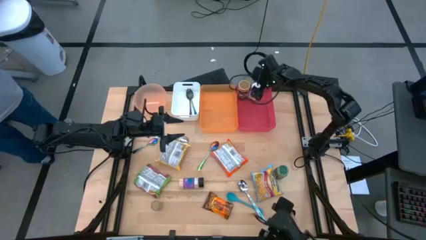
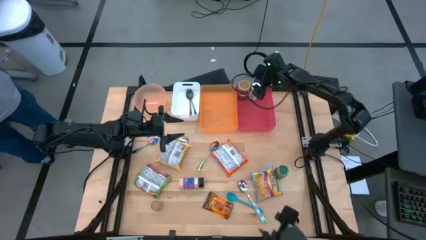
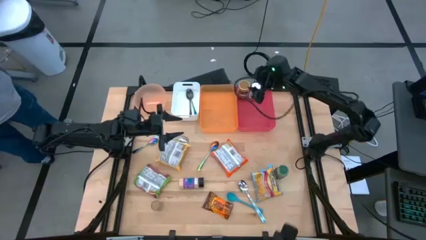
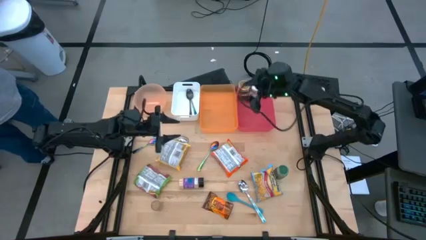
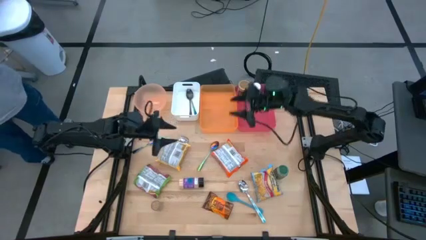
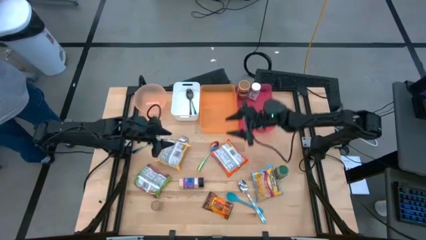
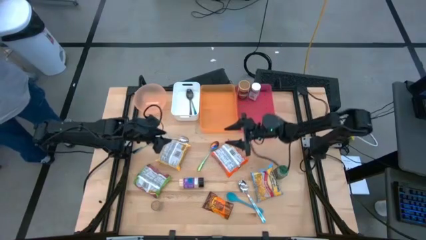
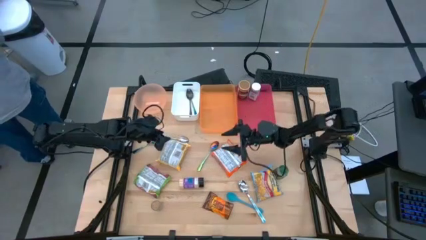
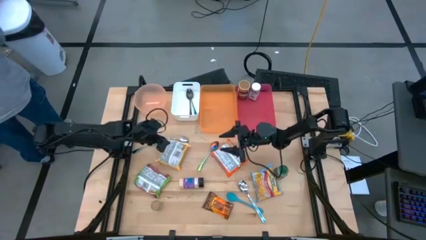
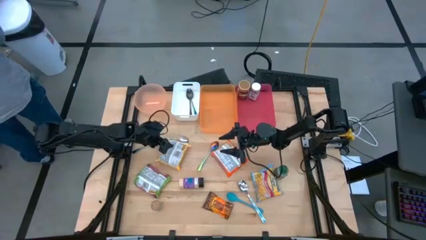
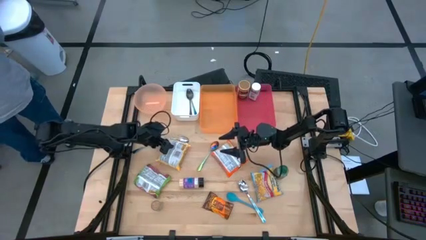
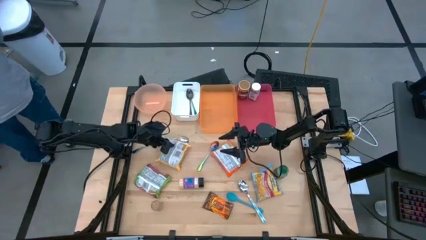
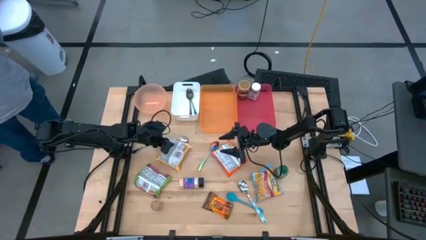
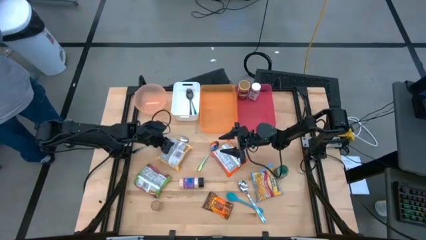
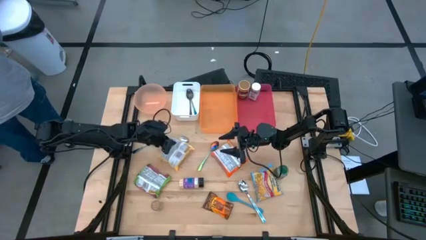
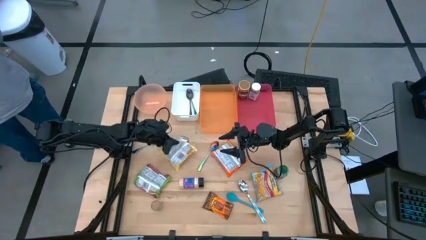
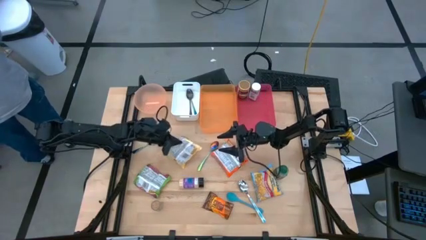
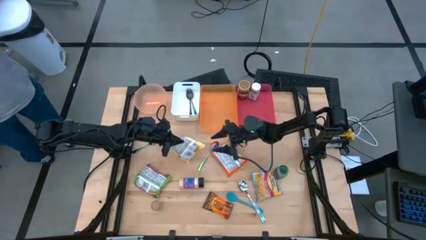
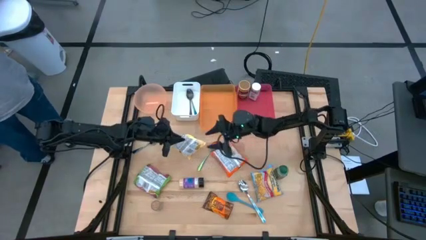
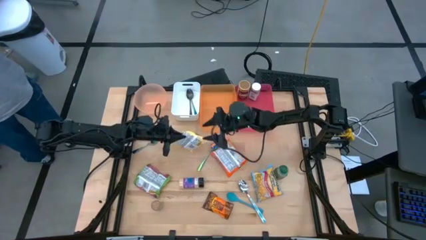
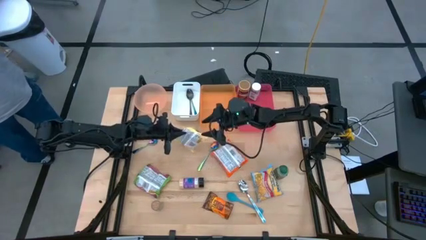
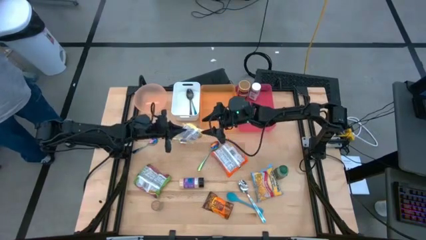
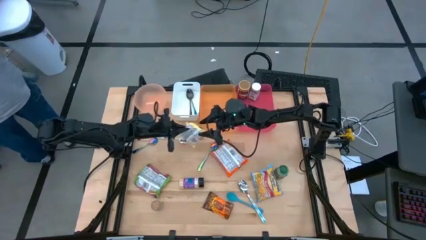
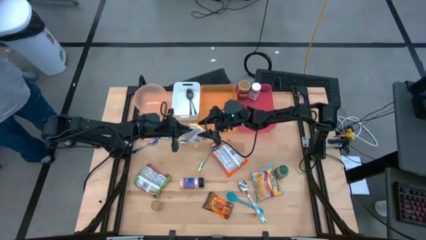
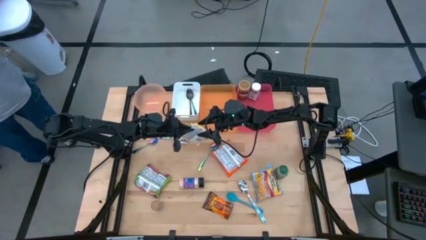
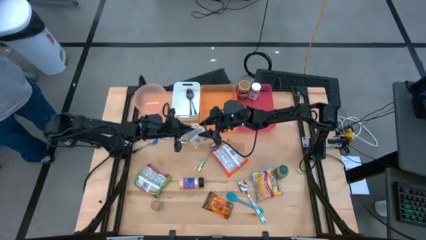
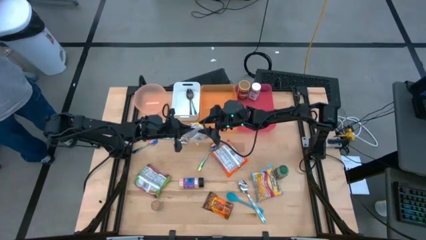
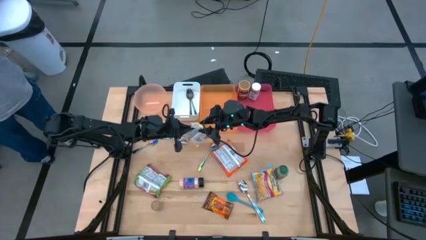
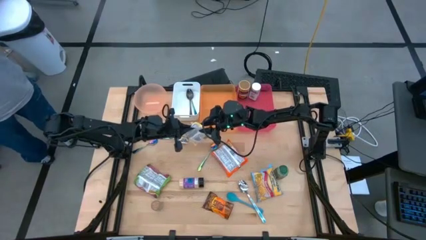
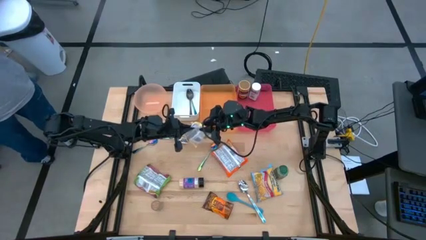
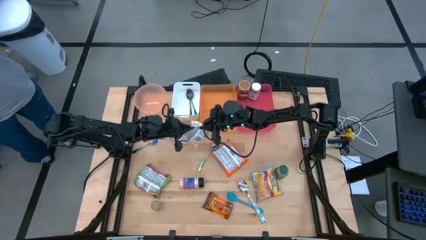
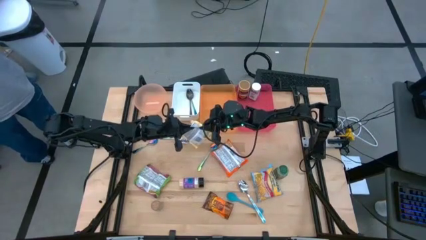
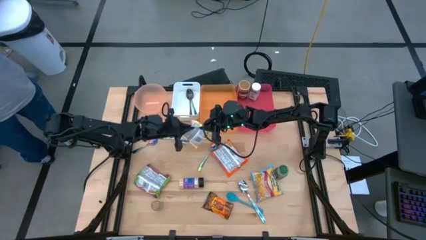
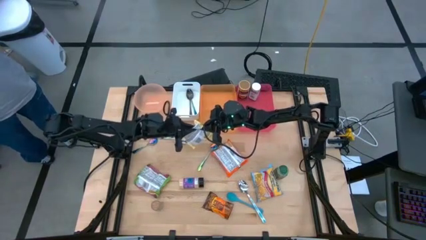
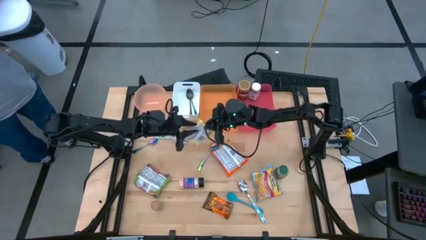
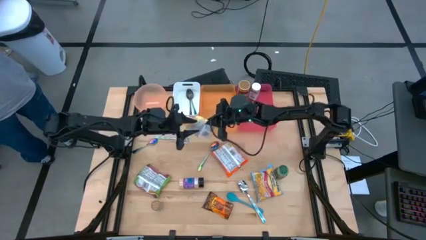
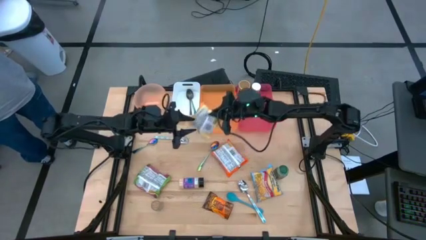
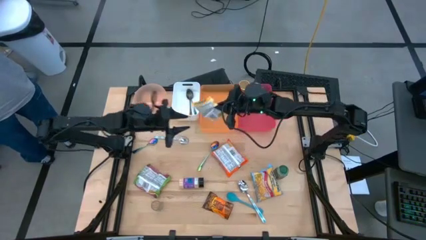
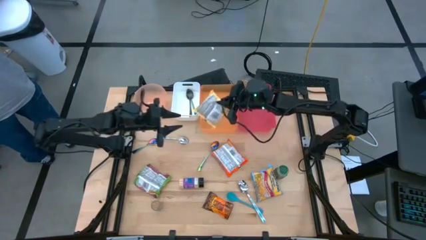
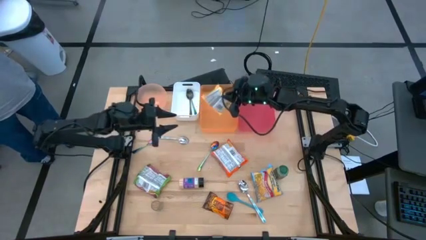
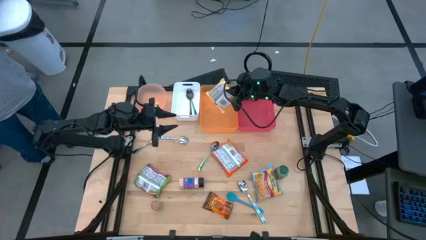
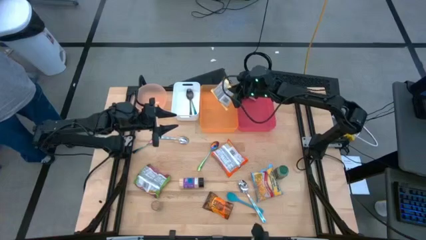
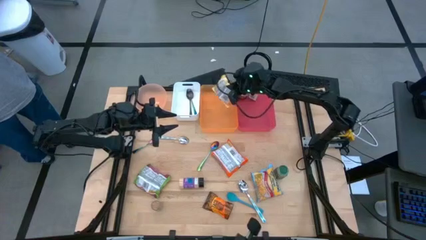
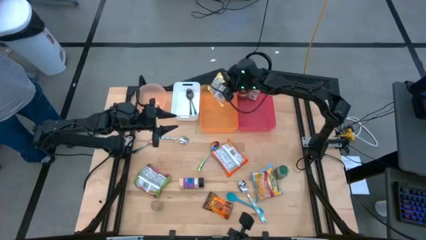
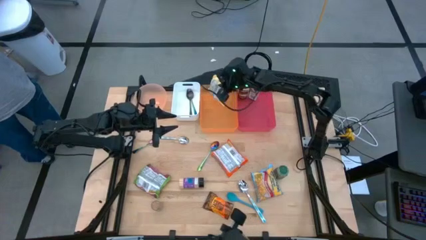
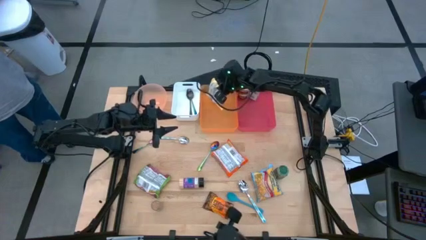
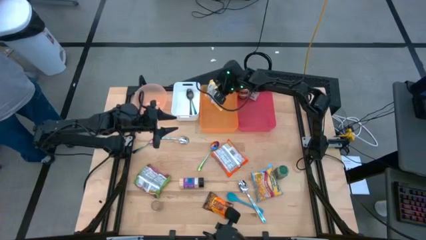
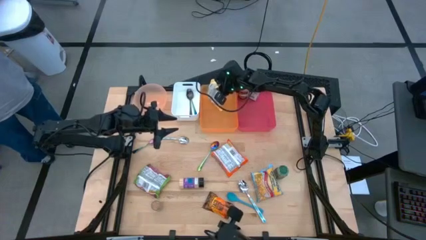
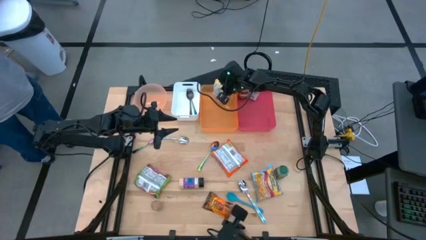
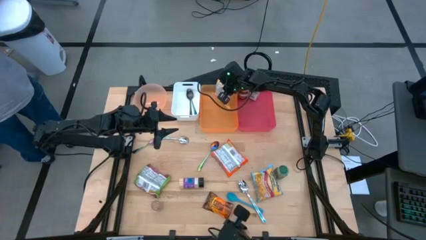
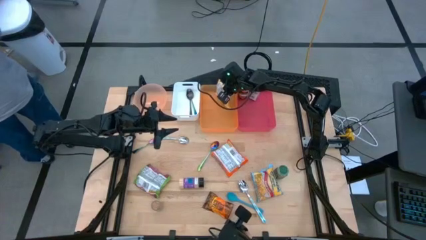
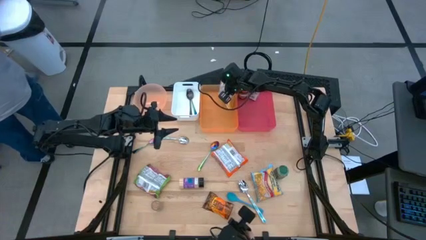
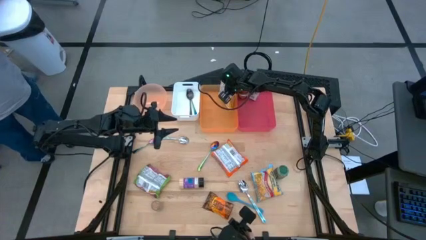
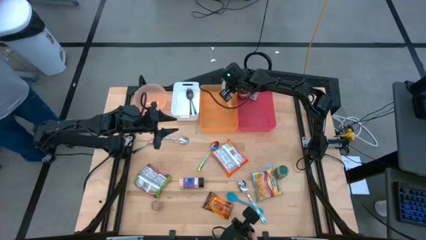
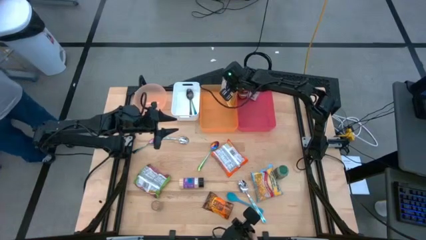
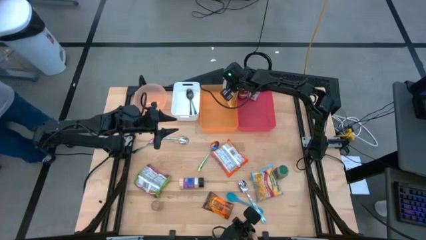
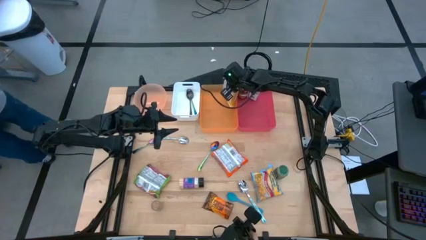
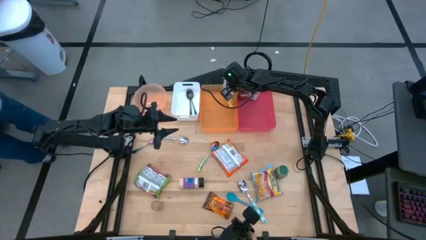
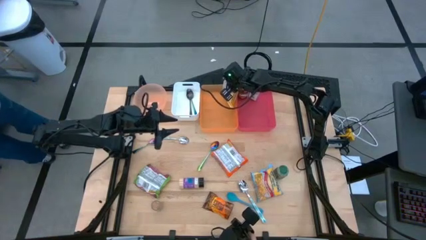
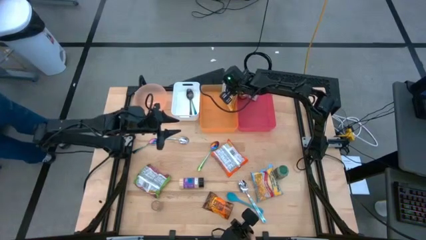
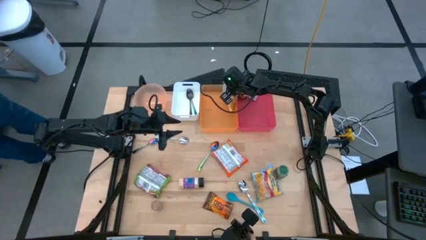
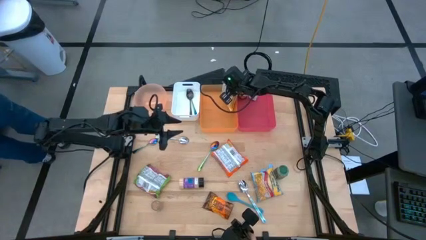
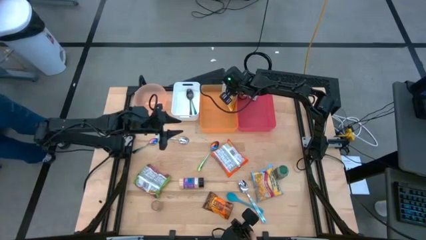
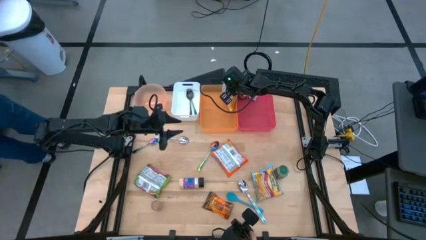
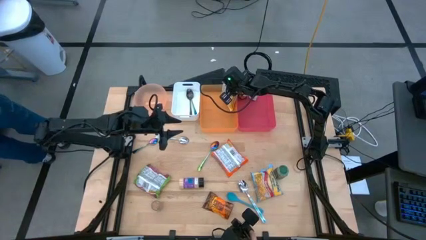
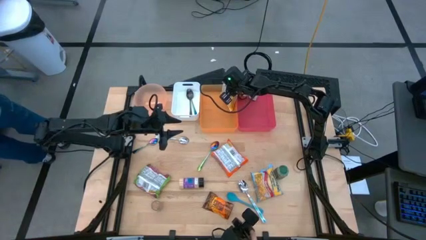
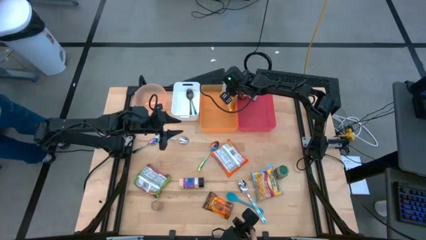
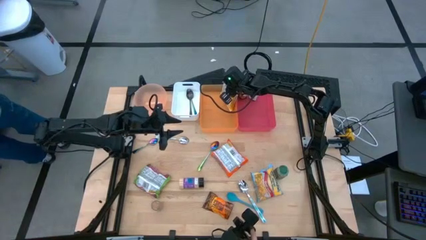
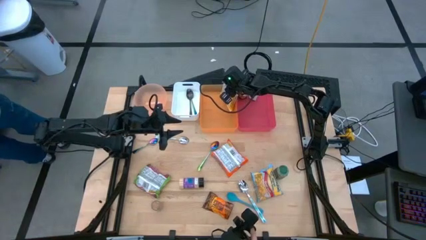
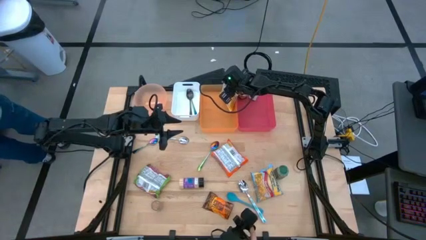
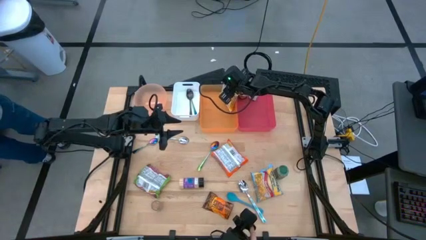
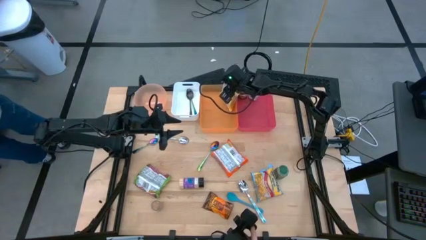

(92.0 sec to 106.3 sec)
Task: Pick & Place Food Item
Put the yellow noodle pack into the orange bin

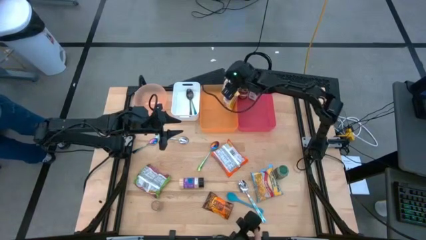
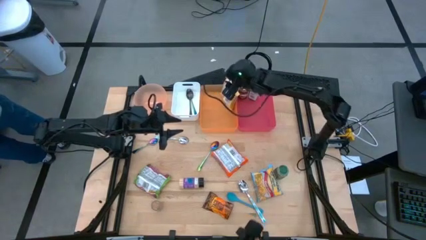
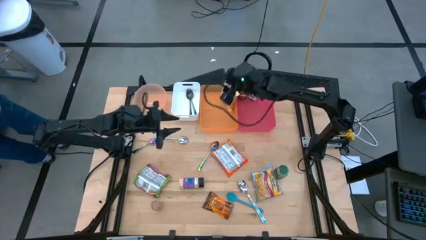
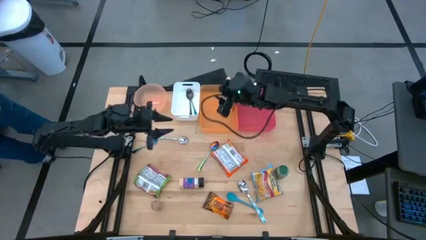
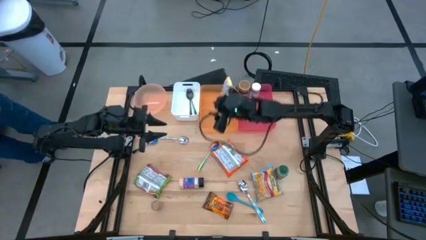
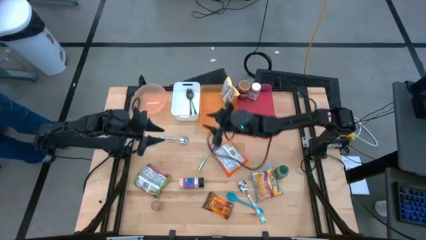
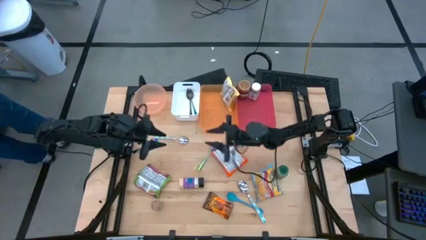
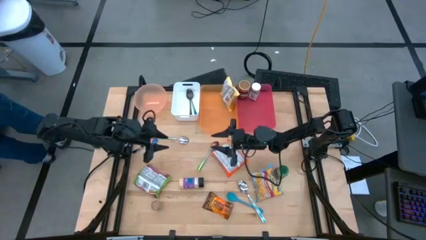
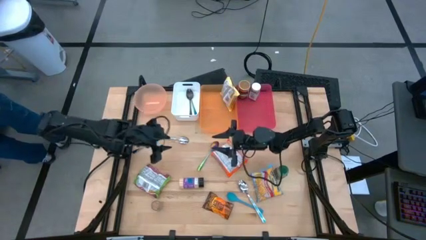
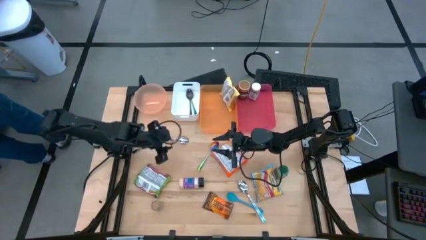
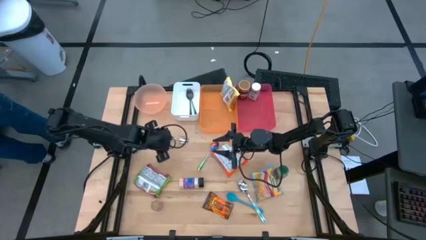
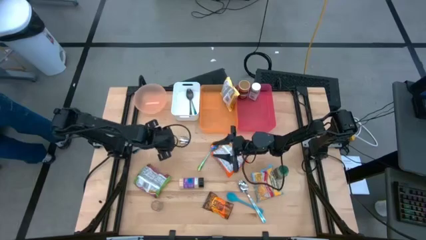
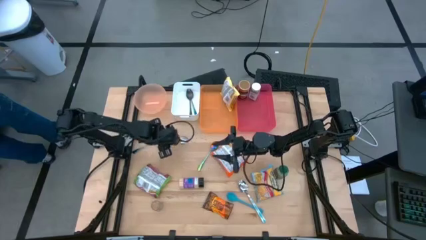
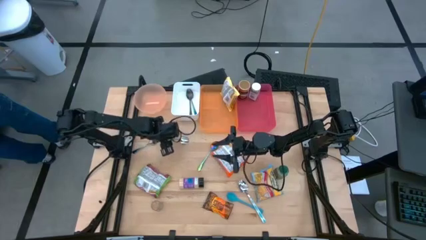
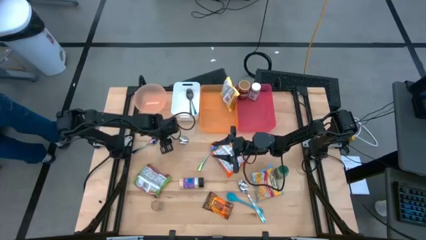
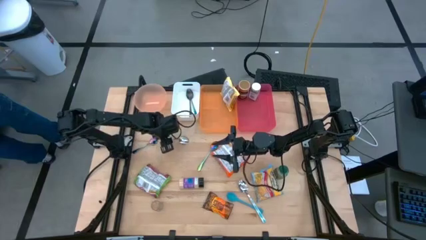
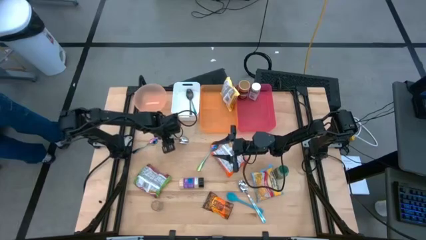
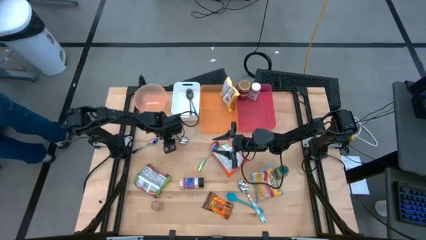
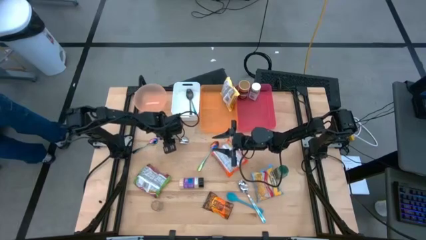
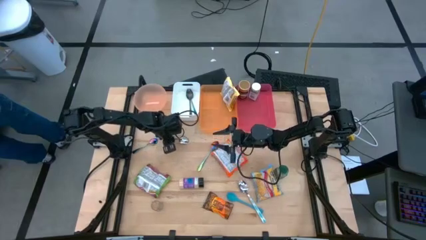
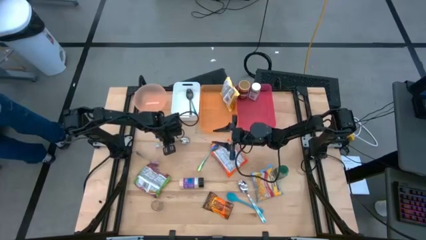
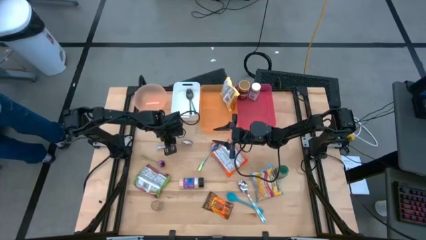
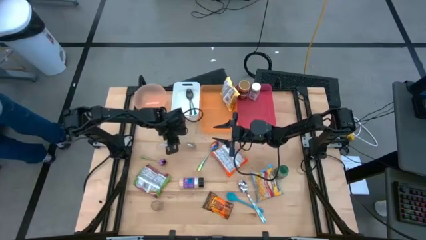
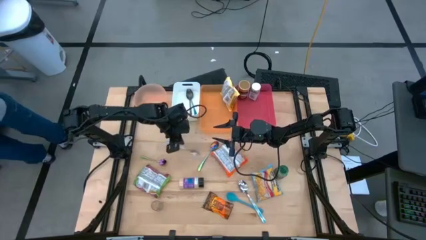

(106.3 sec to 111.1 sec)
Put the top blue patterned spoon into the white bin
